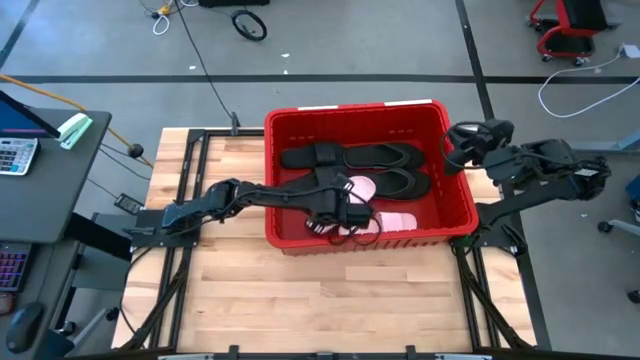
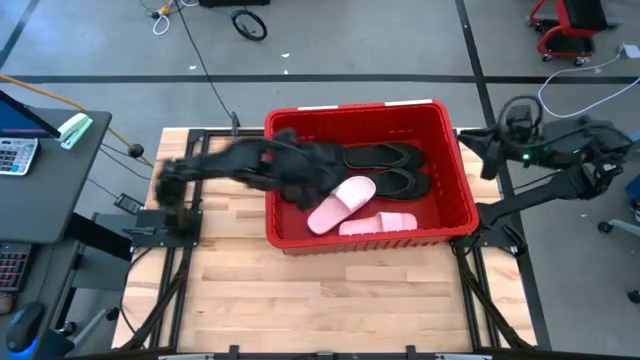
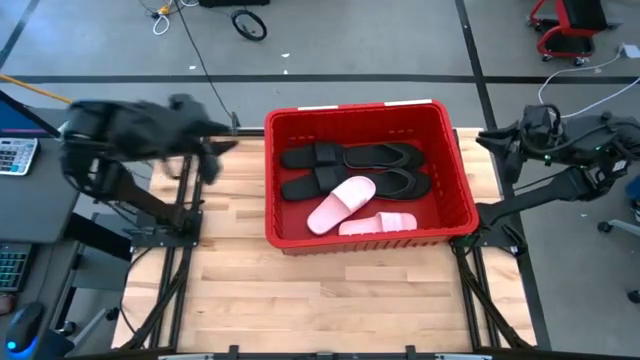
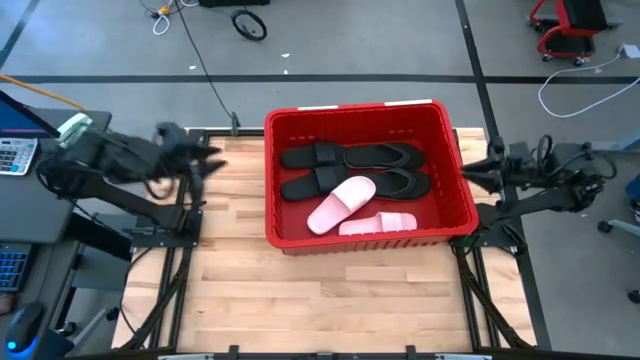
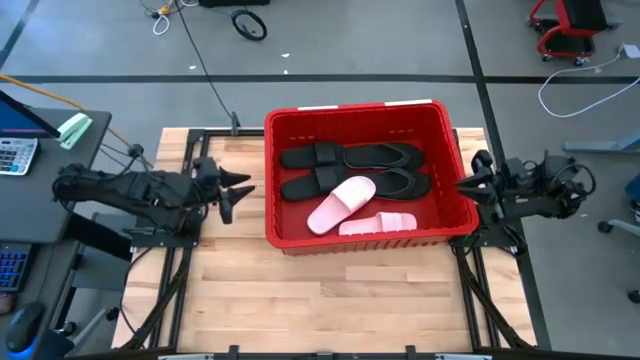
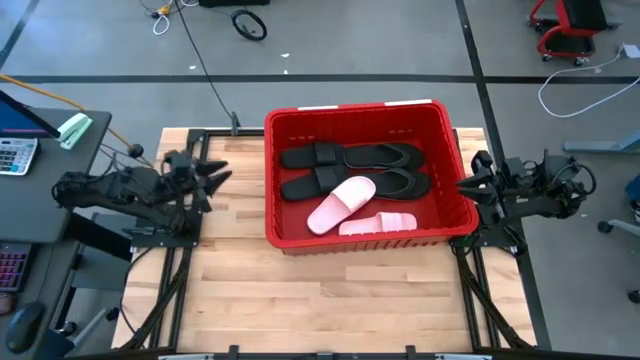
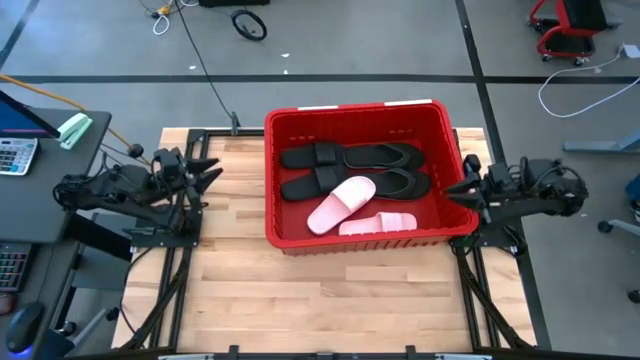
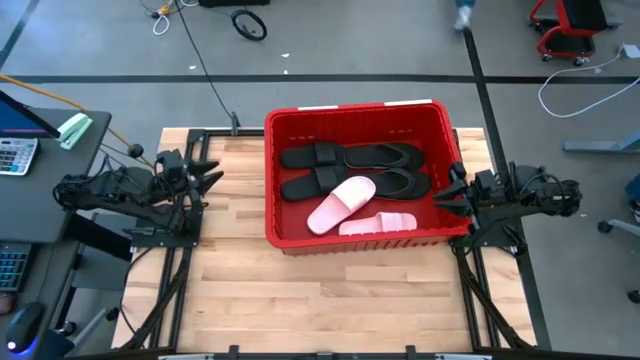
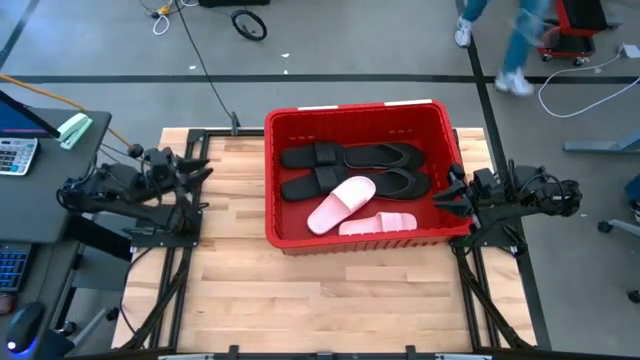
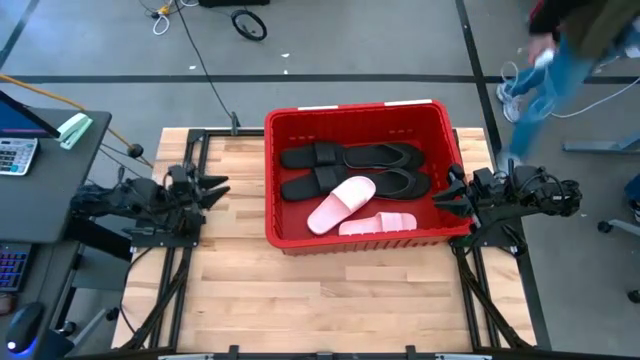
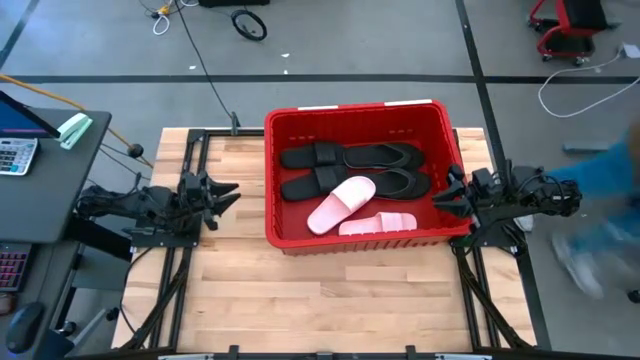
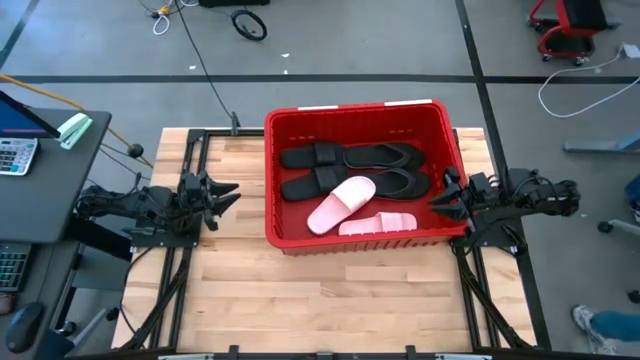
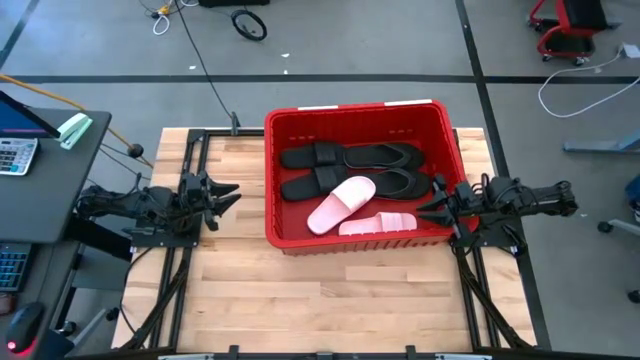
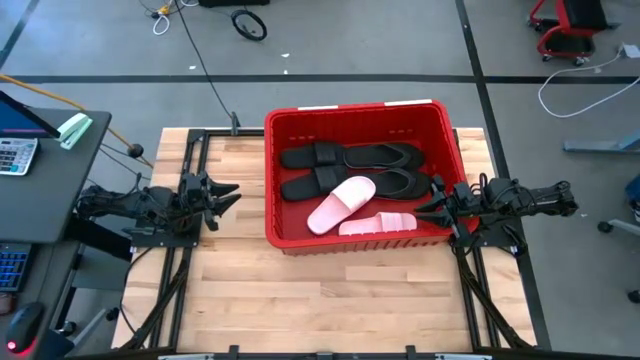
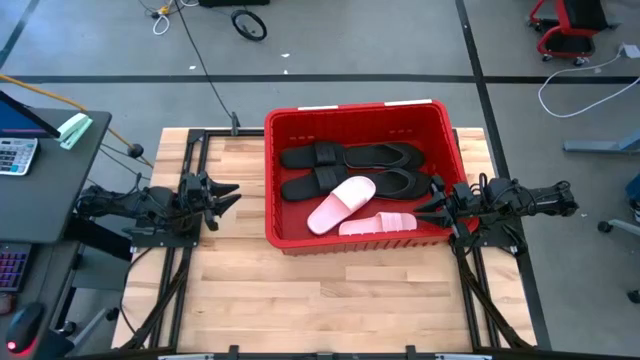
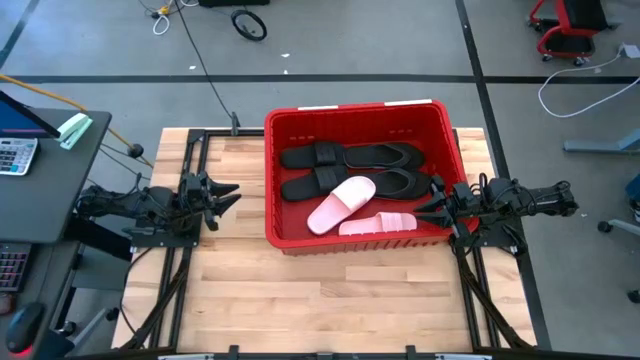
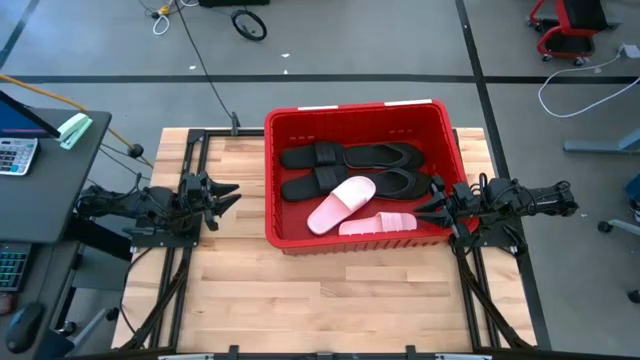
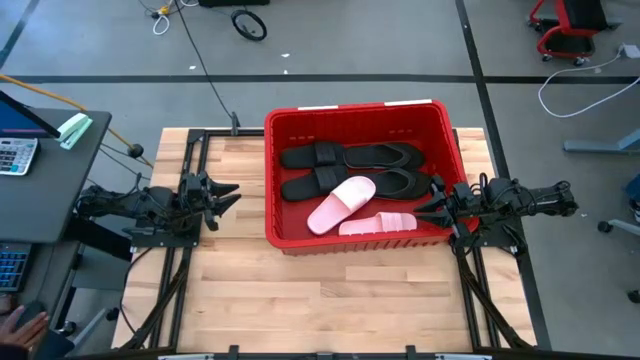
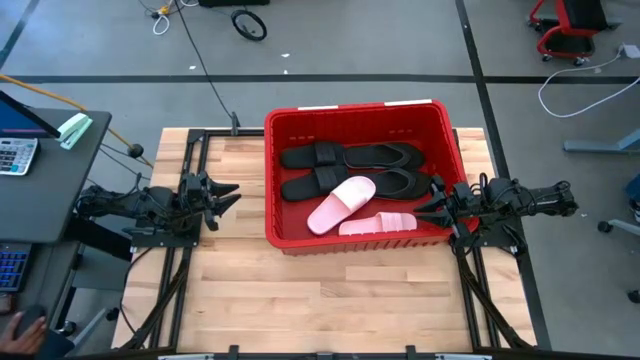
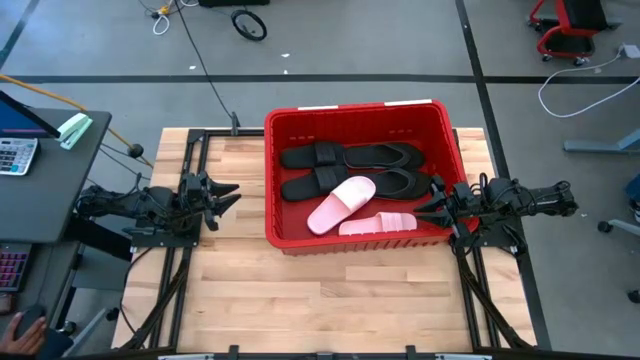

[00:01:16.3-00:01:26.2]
Task: Pick and place slides into bin
Return to Home Position

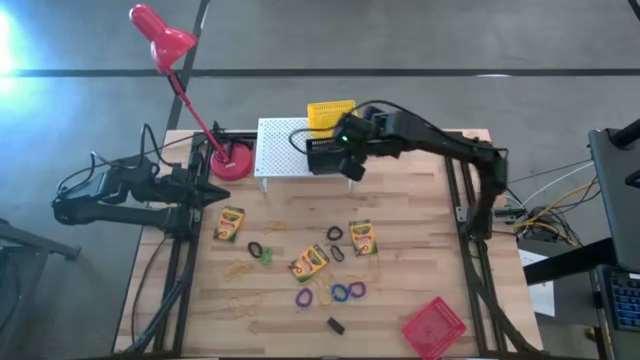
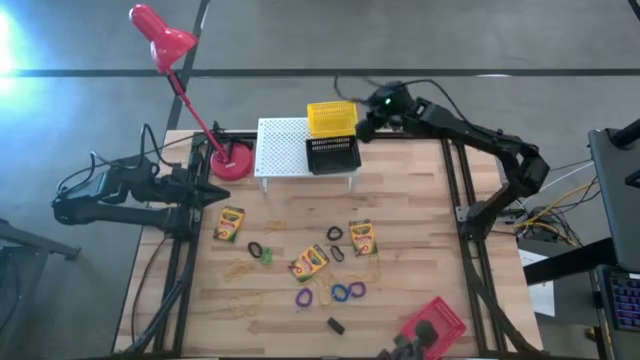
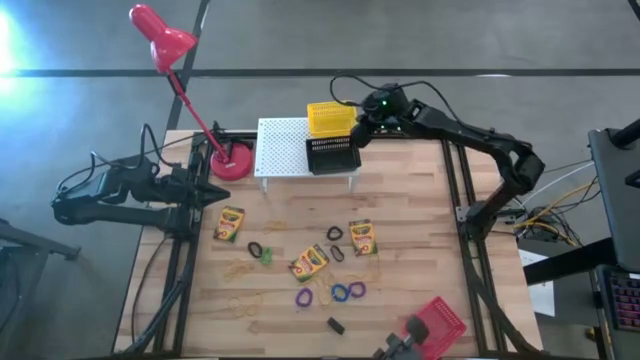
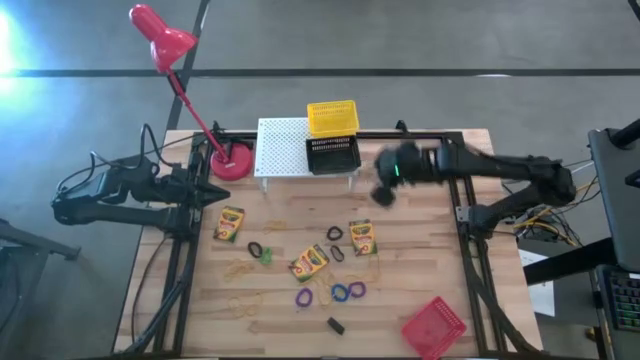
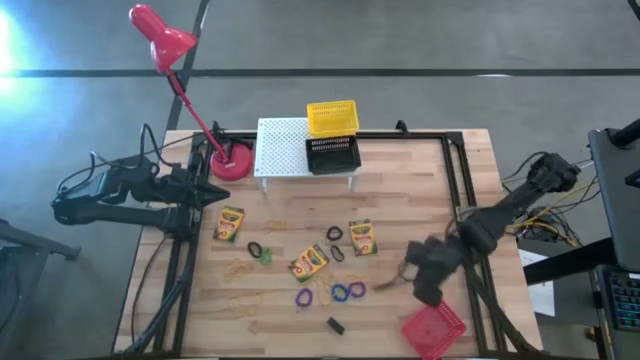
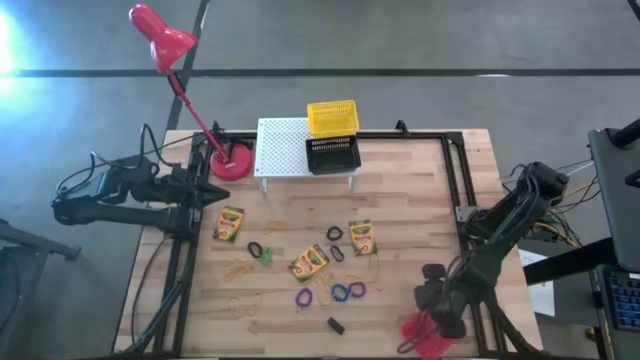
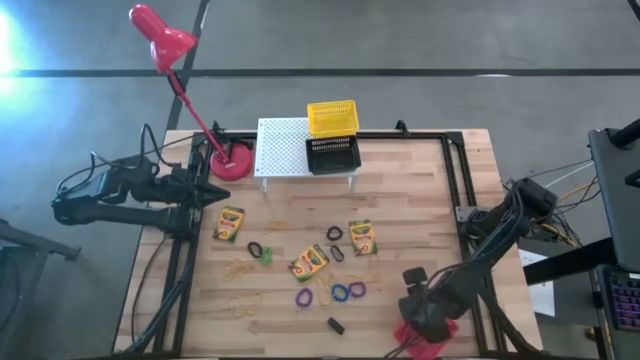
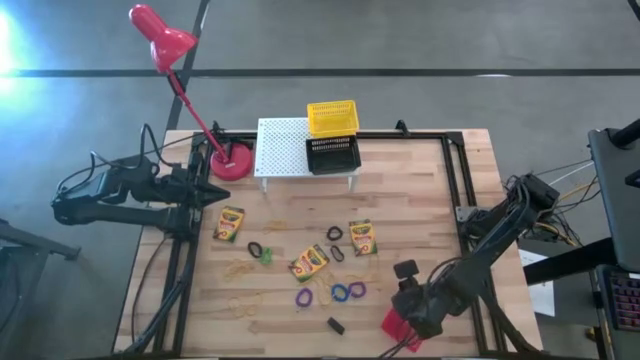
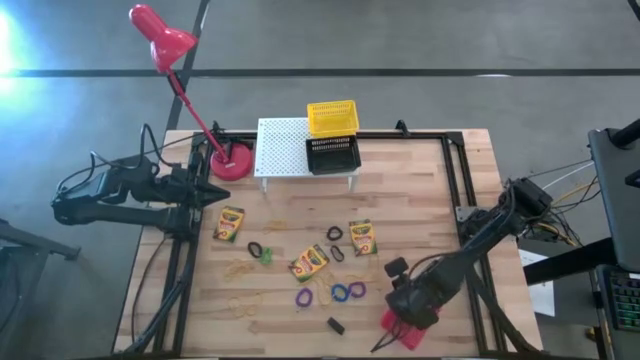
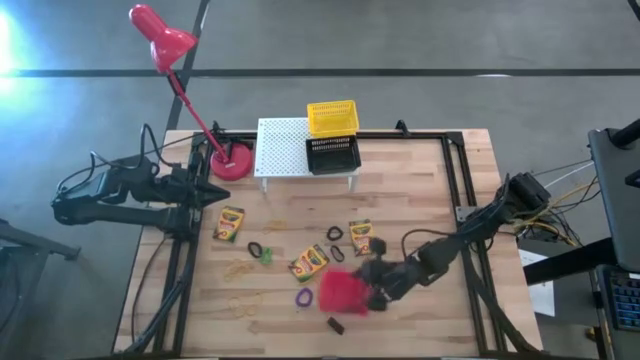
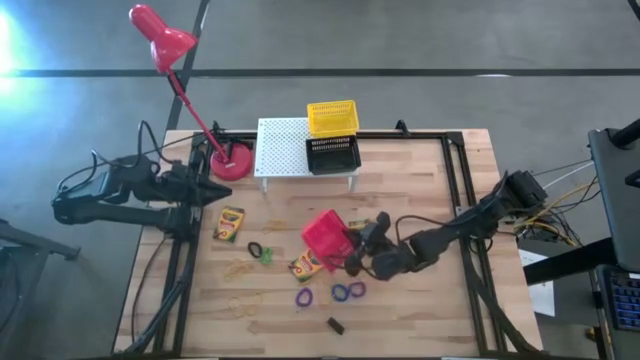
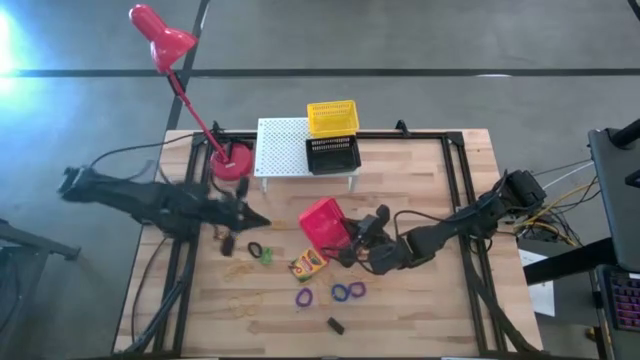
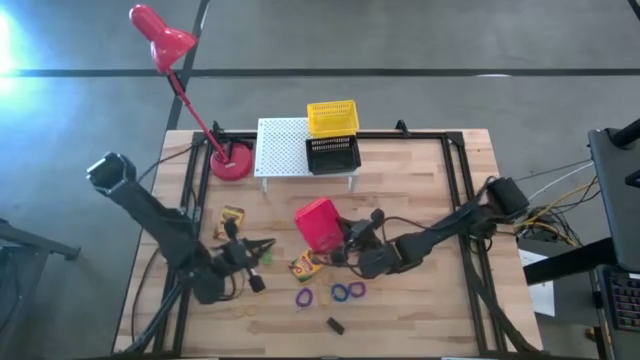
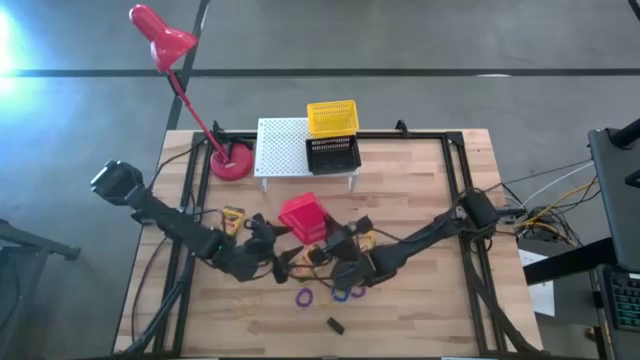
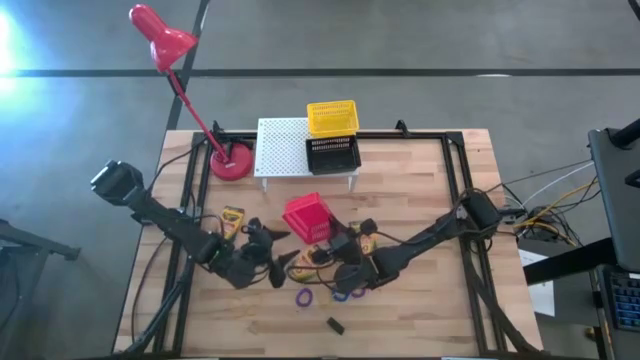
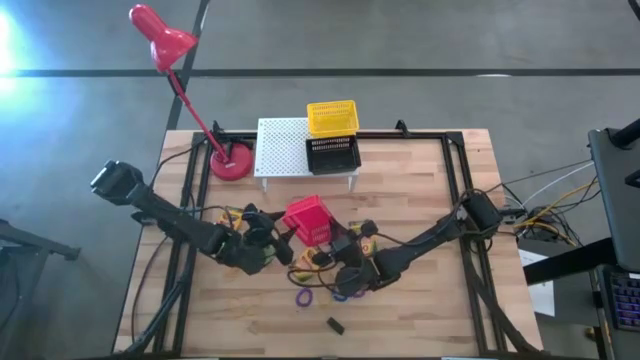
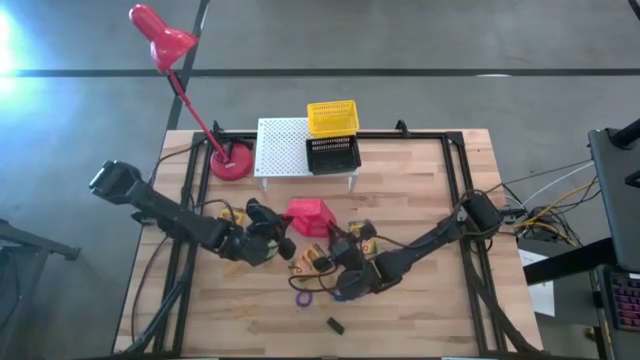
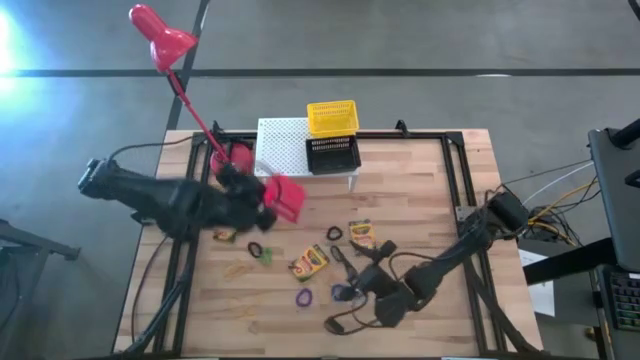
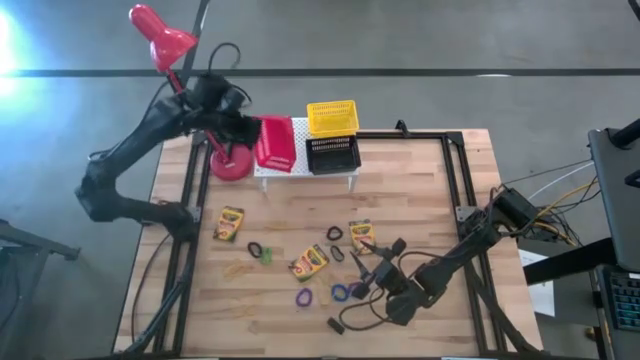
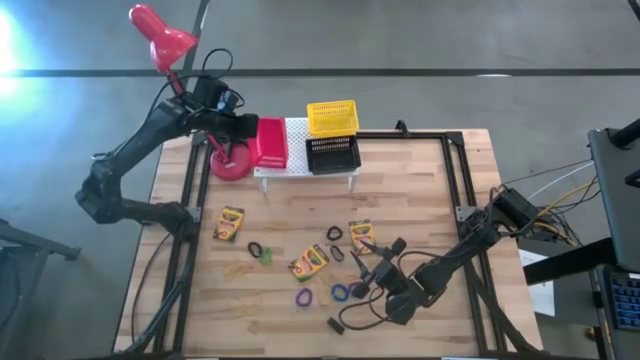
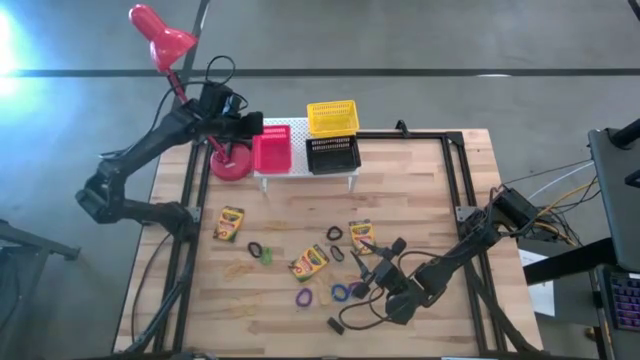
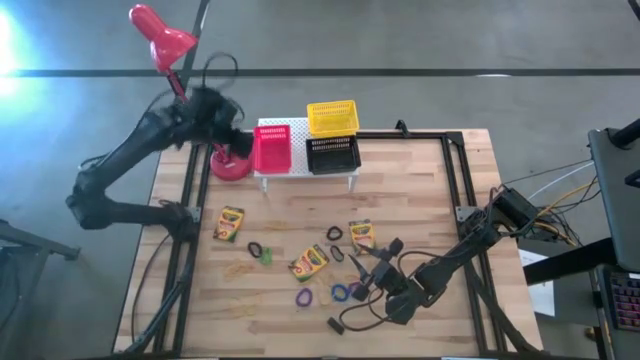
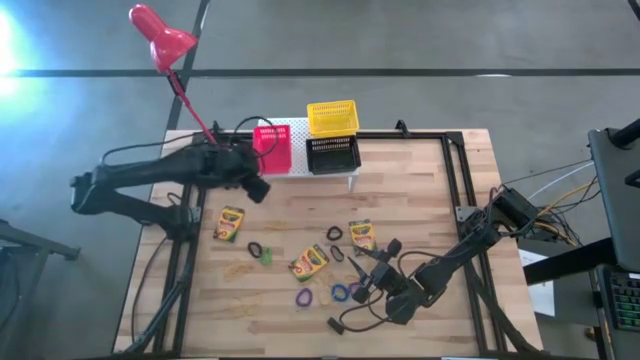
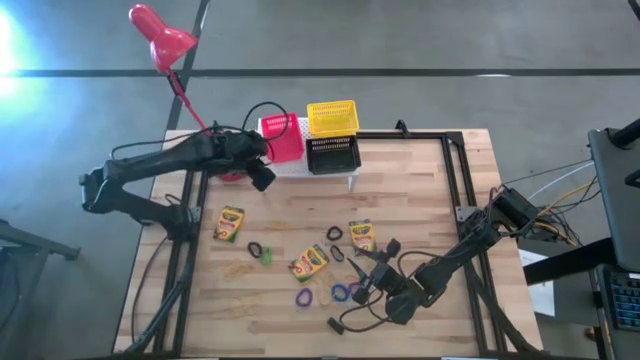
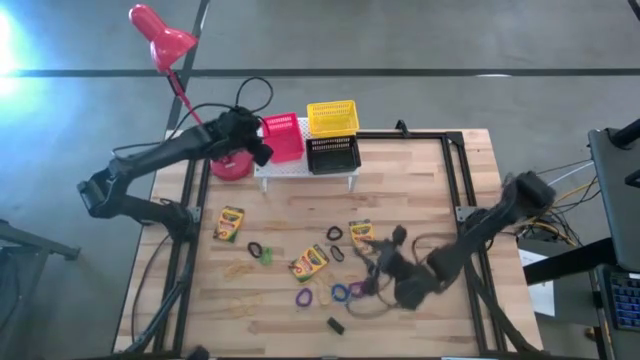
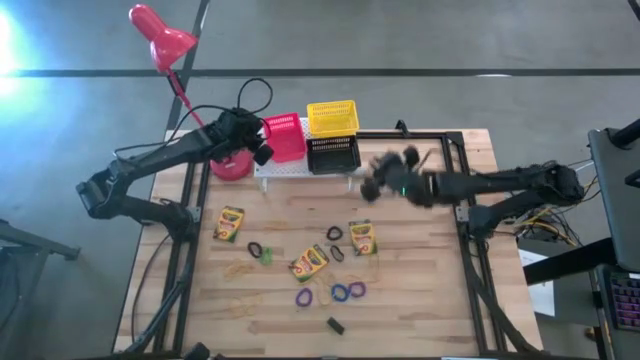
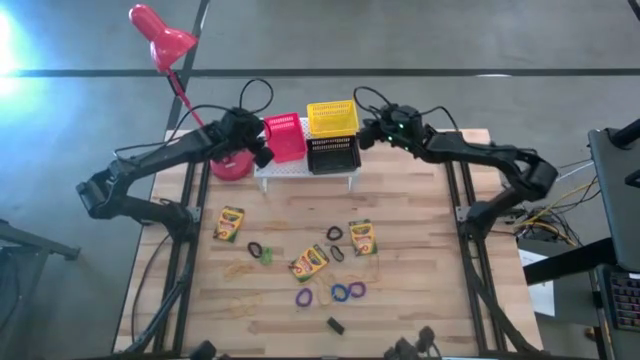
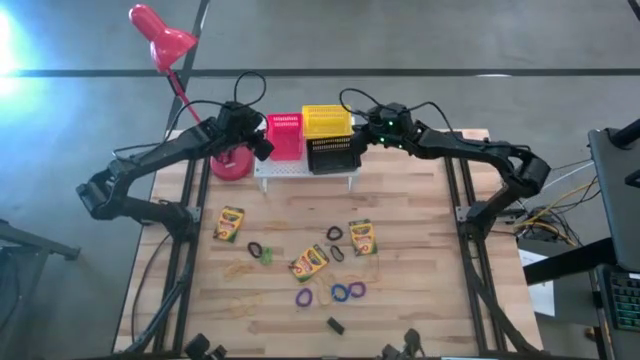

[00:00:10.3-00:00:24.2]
Task: Pick & Place Office Desk Supplies
Put the red bin on the shelf
